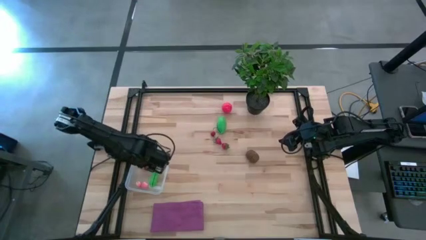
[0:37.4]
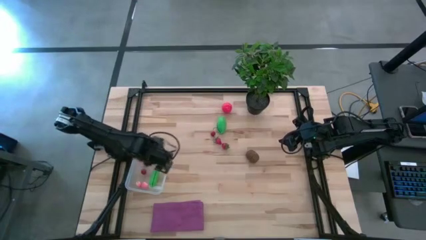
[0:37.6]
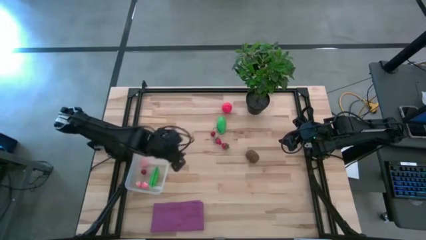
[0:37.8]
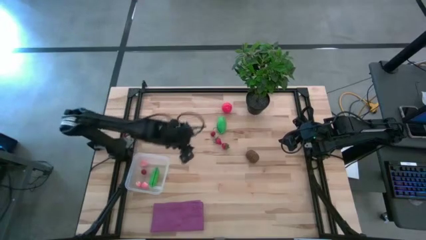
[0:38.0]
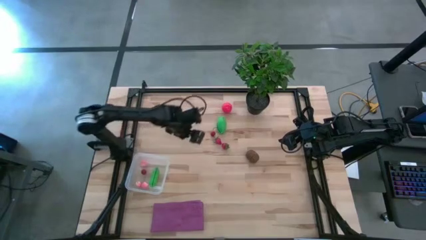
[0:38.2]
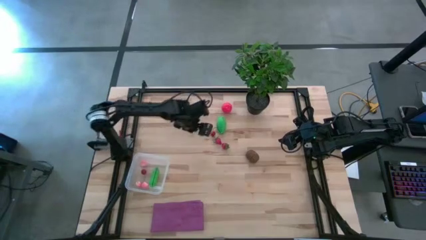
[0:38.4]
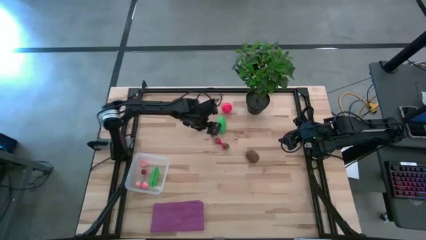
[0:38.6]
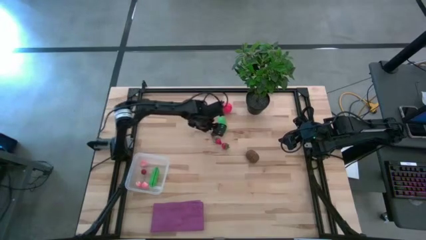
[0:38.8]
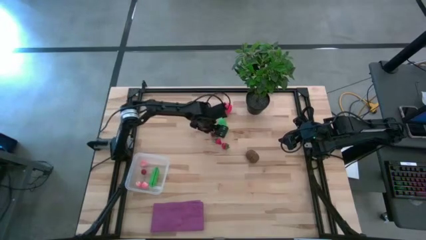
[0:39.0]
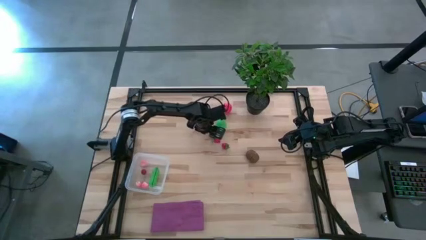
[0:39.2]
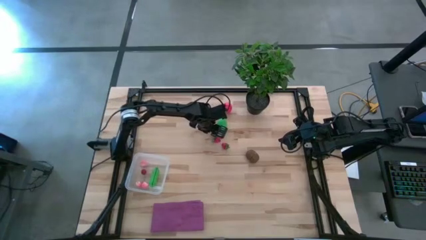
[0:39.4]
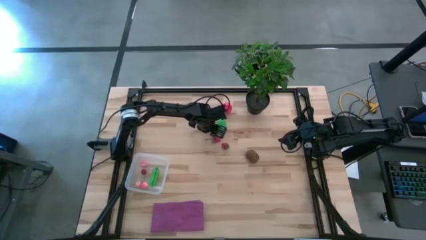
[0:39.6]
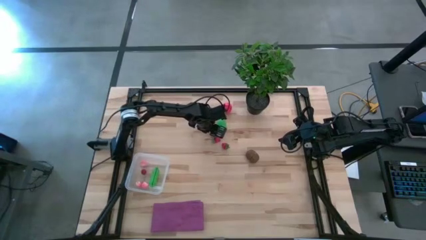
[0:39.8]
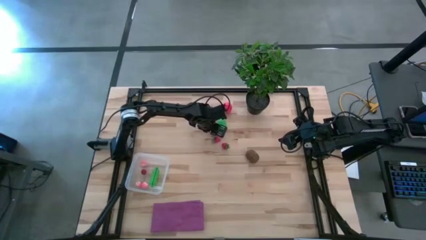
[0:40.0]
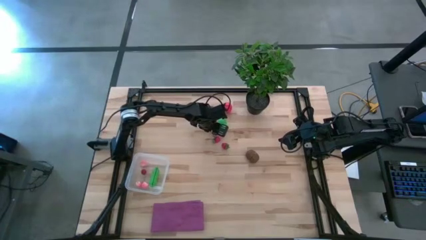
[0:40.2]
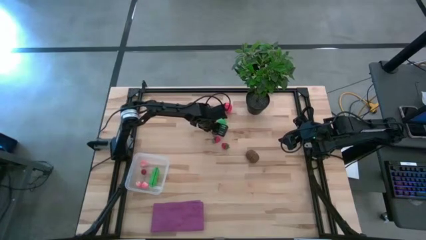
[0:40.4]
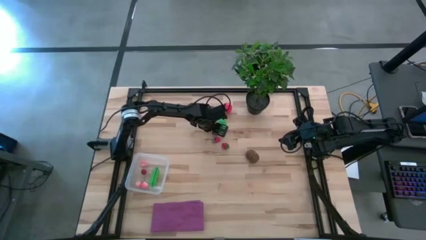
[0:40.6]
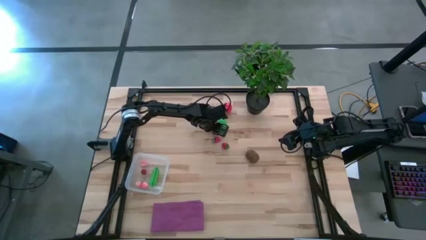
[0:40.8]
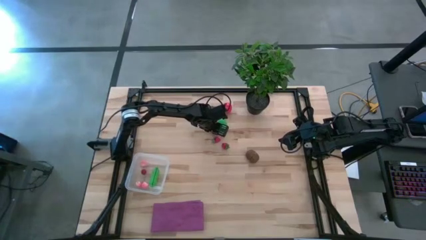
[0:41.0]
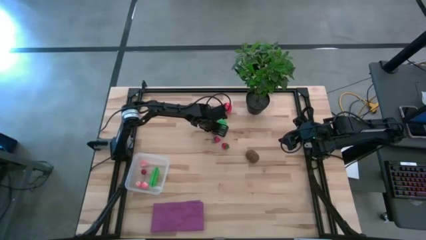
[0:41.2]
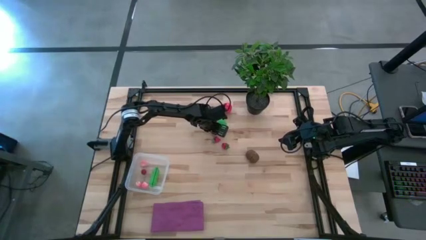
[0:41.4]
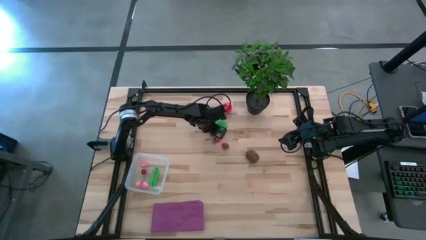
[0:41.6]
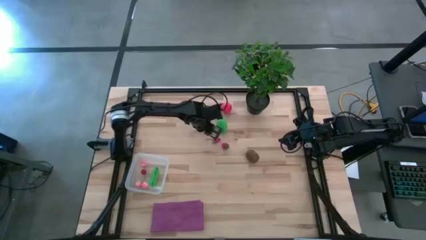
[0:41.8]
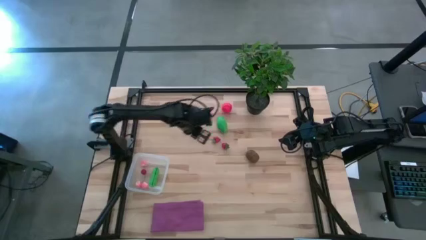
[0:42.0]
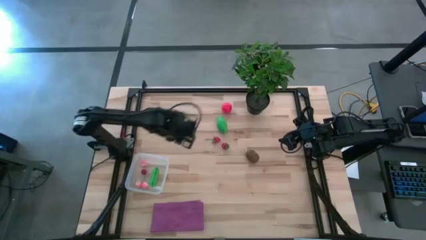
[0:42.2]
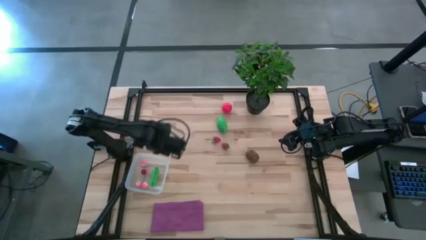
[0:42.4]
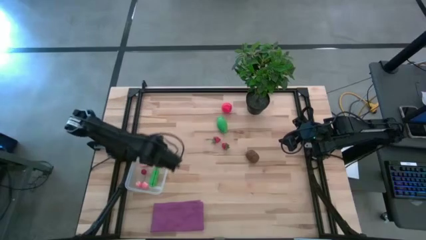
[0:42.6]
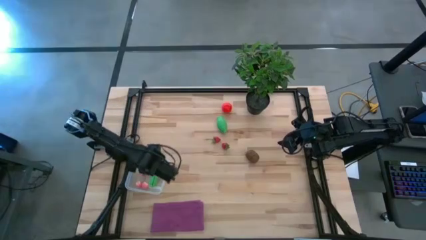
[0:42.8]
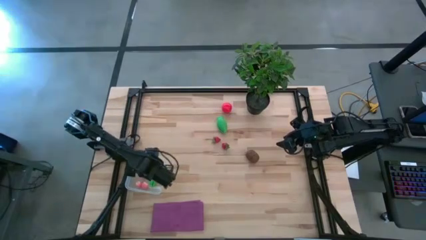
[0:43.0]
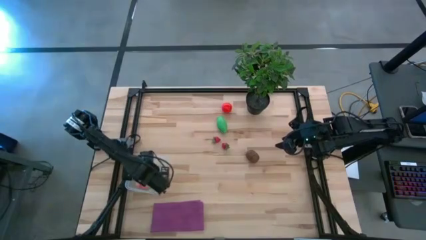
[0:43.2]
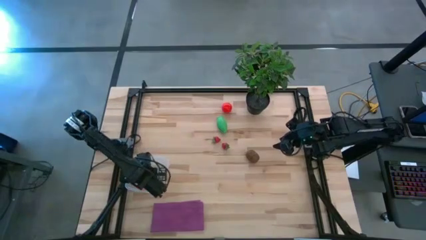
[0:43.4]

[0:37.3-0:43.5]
Task: Pick and placing Produce into tupperware
Put the red cherry into the transparent container

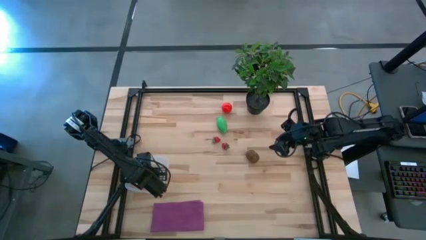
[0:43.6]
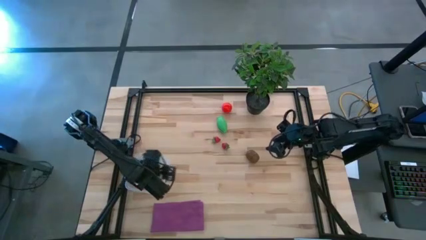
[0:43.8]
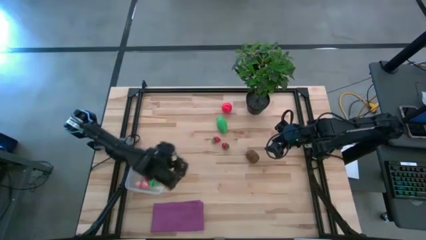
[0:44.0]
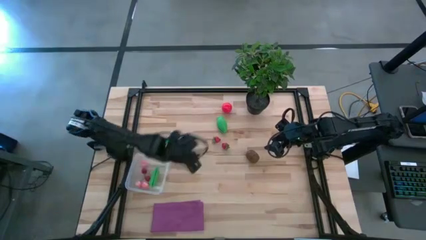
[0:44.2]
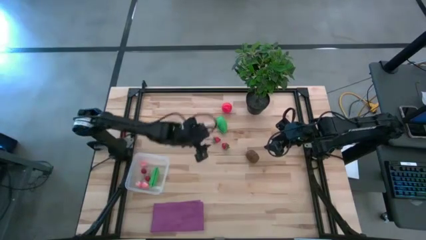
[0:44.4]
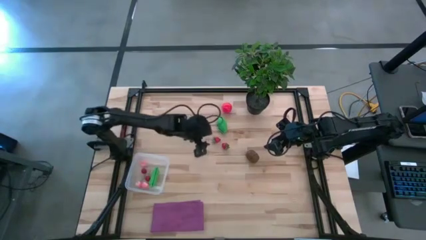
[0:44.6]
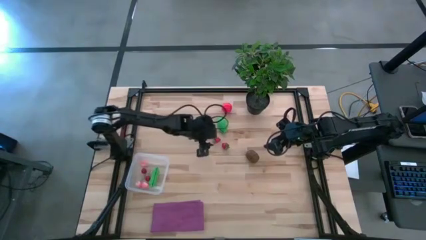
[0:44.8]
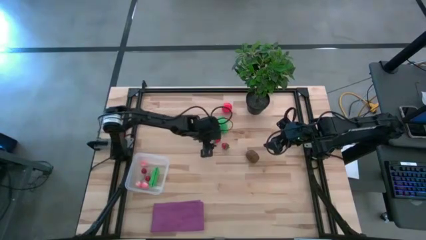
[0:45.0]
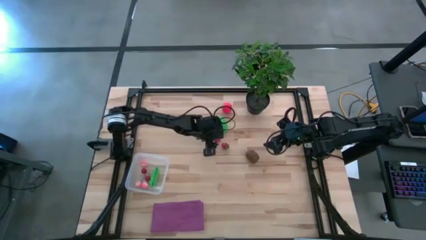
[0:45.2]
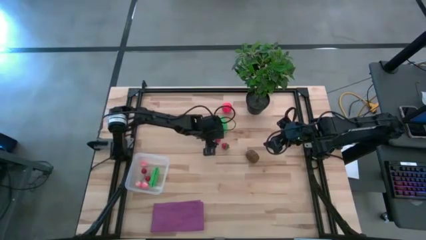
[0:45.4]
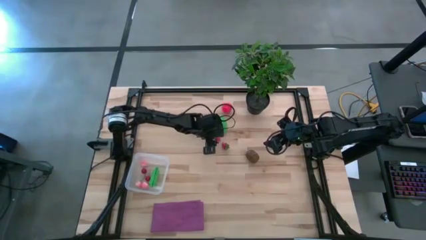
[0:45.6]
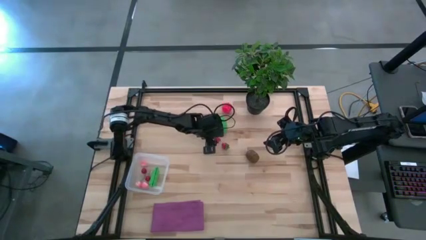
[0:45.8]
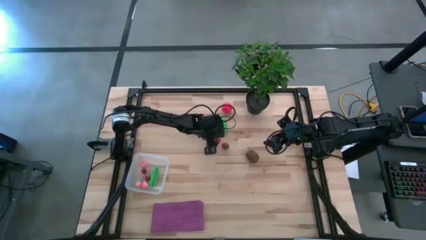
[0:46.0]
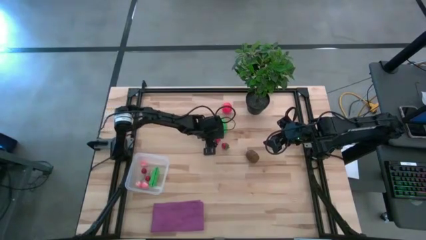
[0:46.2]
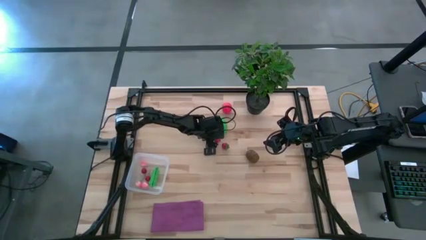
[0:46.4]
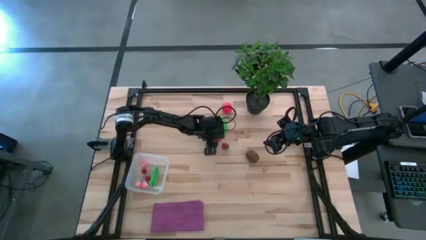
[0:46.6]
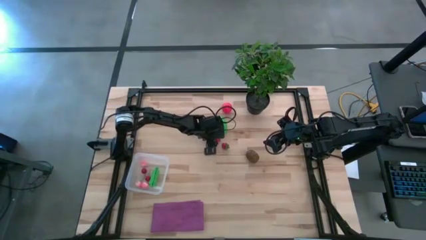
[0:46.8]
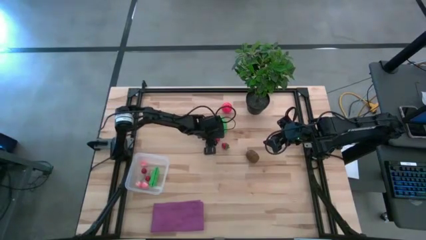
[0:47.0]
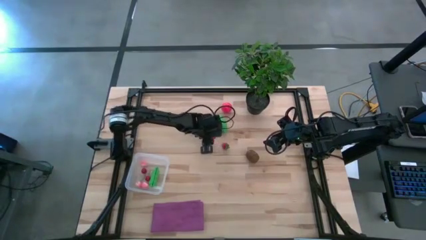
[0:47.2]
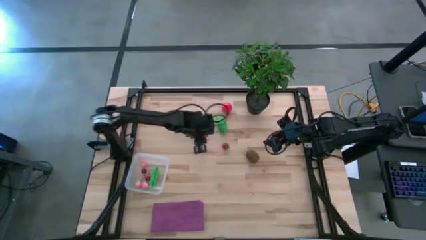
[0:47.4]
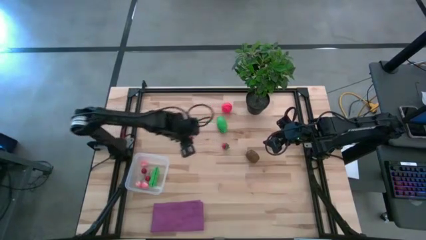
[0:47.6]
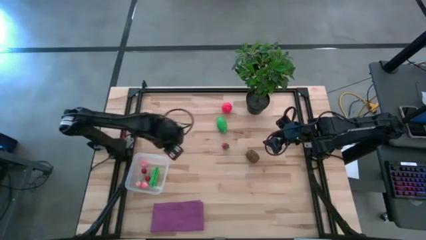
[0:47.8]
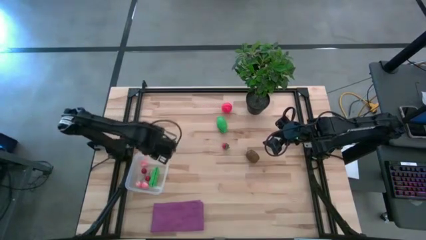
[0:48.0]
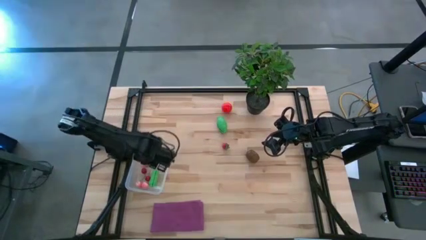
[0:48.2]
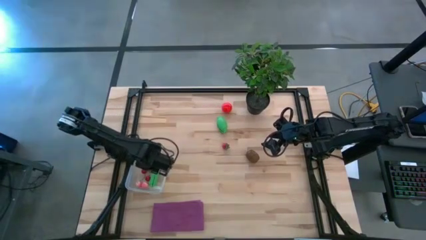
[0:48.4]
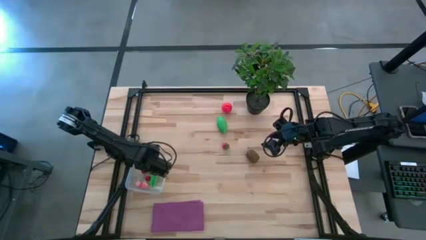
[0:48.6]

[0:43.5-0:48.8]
Put the top red strawberry into the transparent container

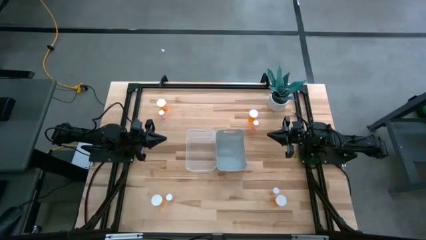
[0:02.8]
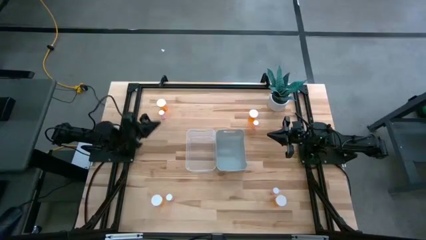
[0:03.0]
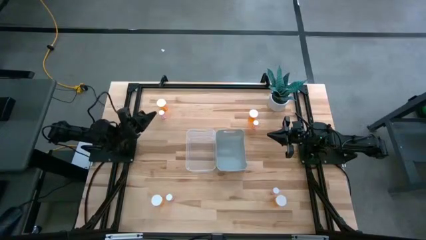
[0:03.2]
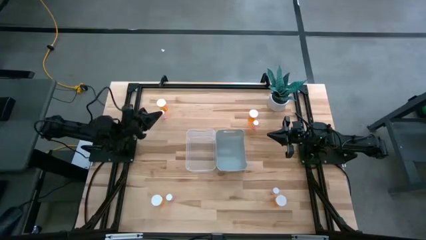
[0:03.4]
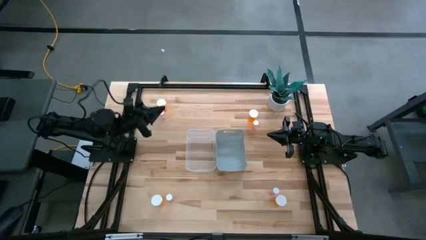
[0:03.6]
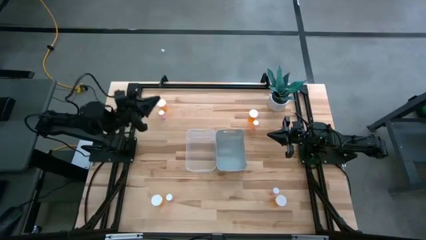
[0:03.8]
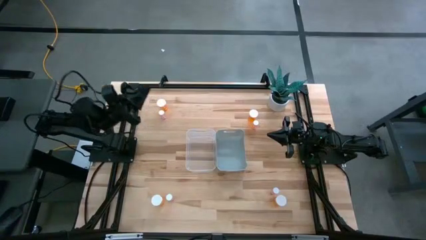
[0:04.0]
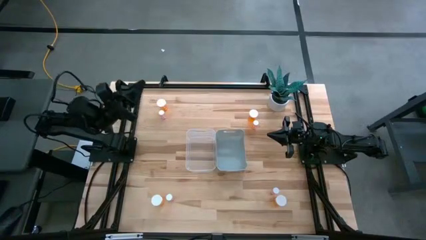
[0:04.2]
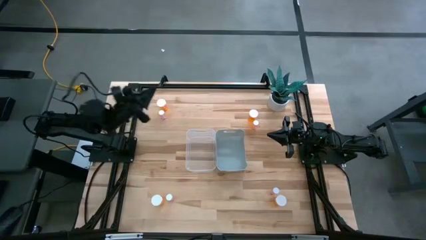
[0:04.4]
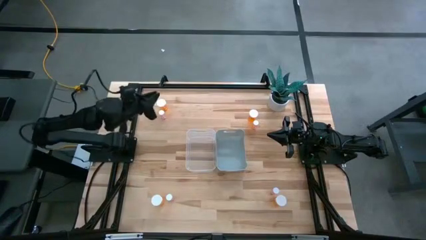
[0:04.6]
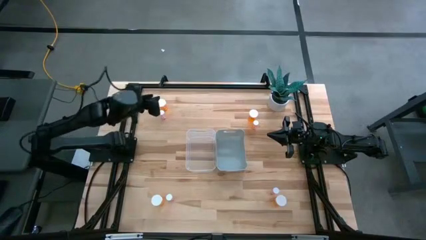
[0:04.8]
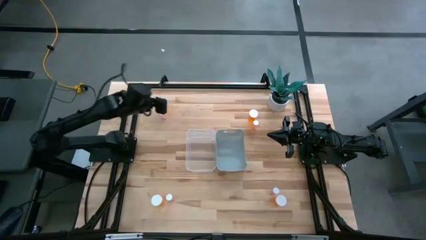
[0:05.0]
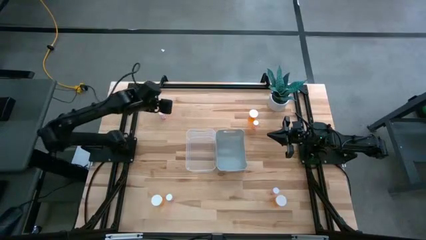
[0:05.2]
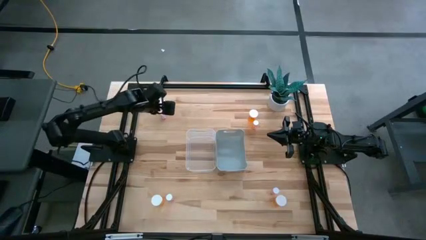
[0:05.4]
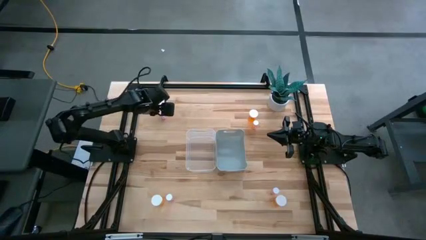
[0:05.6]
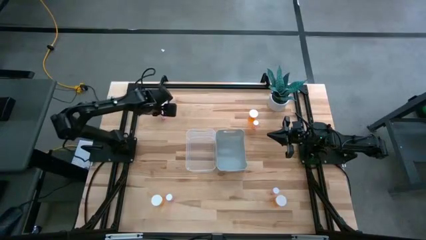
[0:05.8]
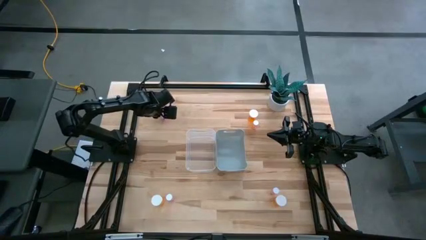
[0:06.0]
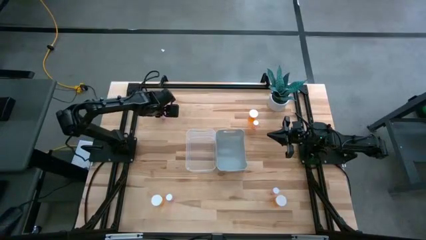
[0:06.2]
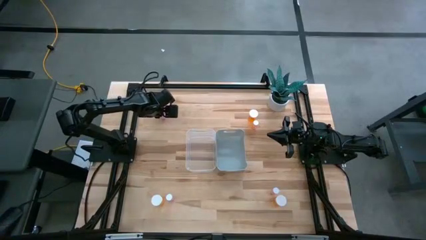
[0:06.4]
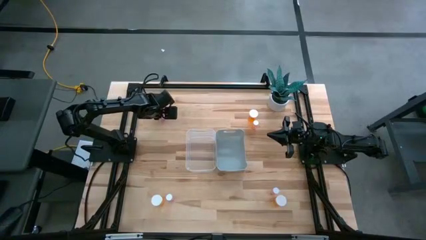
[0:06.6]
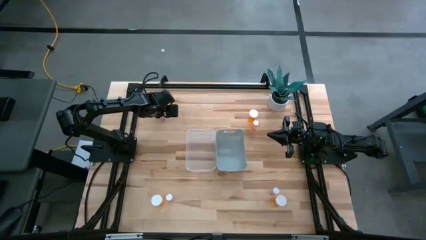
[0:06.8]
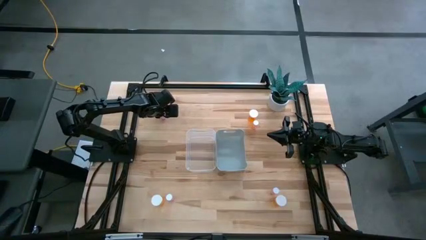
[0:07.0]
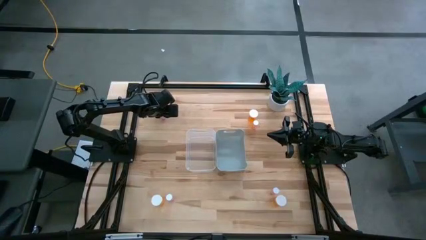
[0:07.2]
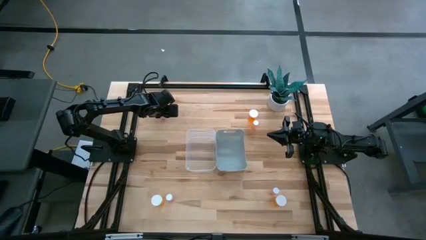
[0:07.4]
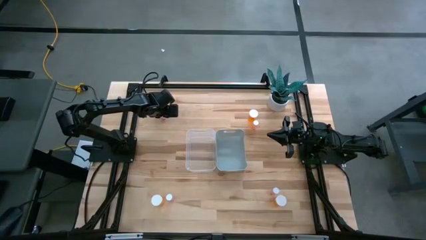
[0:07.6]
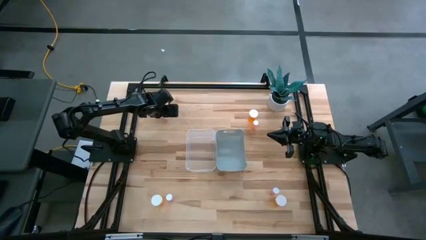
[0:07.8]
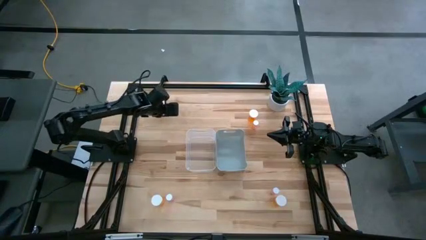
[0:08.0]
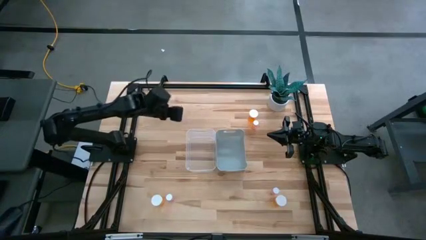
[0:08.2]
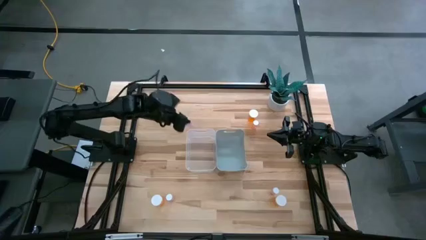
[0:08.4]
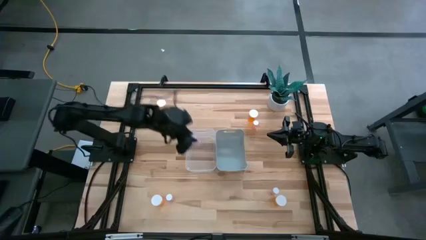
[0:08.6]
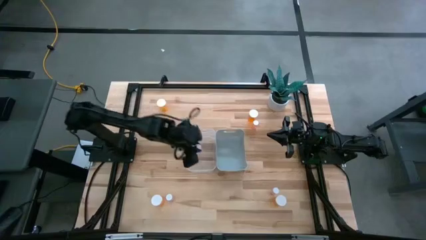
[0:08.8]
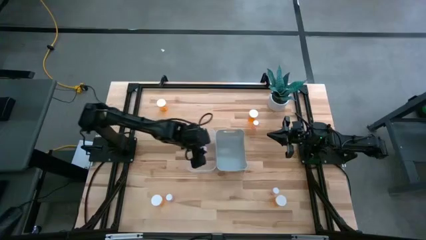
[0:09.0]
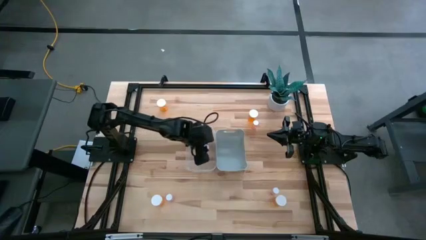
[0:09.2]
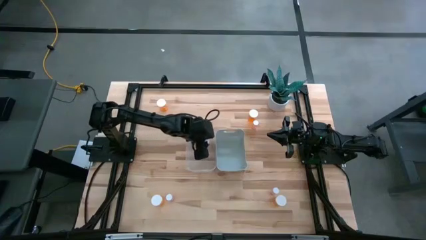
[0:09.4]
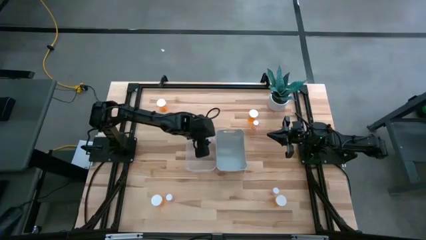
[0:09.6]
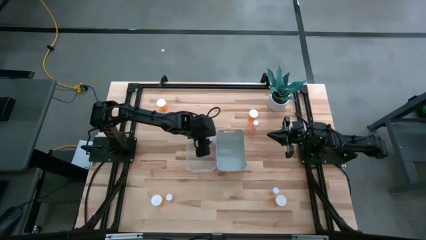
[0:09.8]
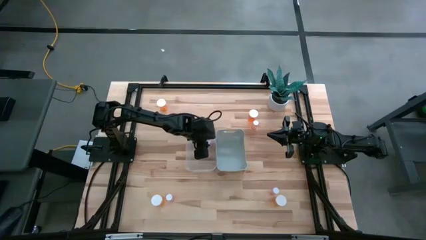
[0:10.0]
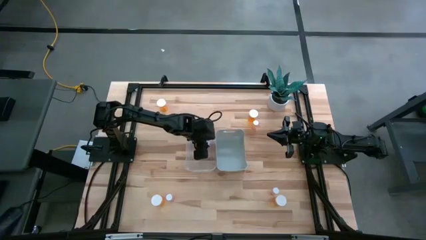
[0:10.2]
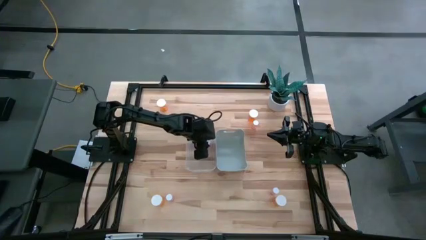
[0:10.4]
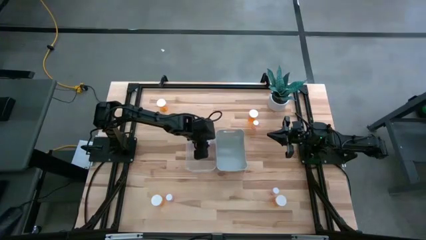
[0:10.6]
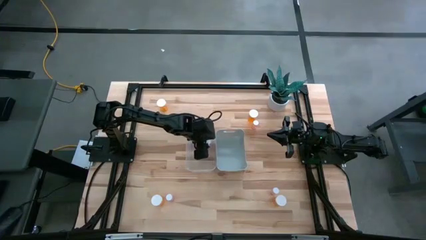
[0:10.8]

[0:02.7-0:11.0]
Task: Pick and place medicine bottles into bin by pill shape (circle, oval)
Put the small pink pill bottle into the transparent bin
